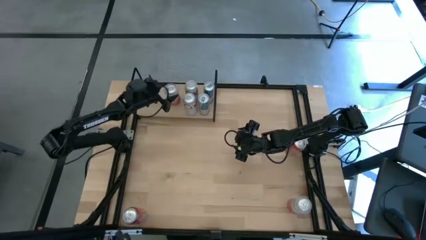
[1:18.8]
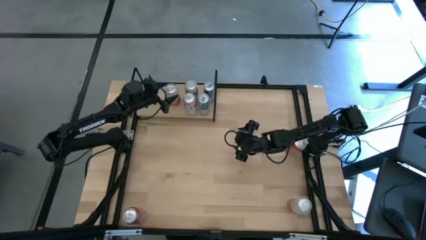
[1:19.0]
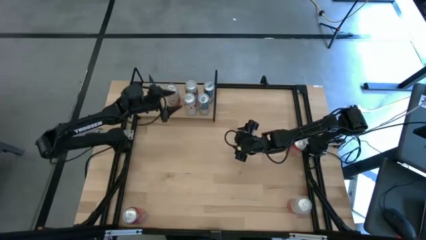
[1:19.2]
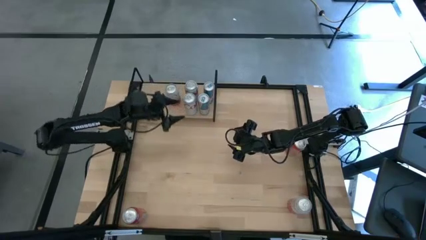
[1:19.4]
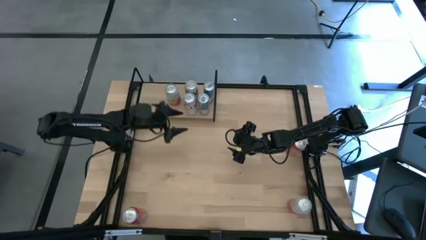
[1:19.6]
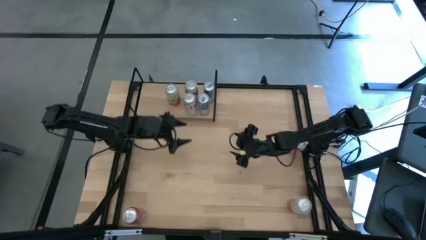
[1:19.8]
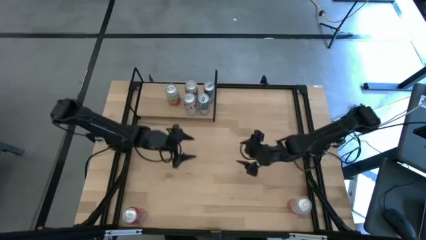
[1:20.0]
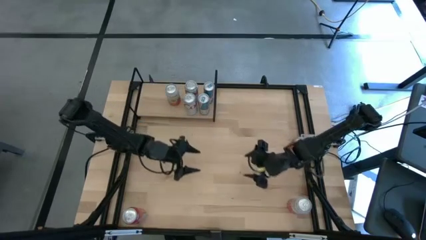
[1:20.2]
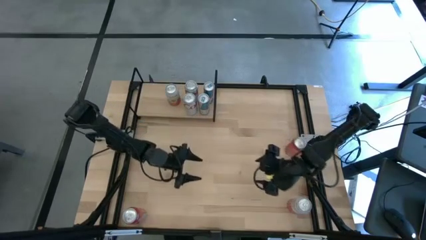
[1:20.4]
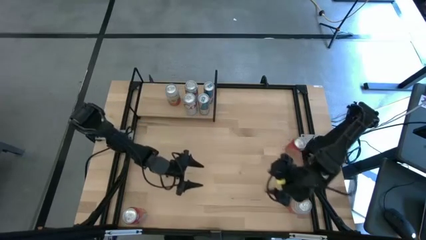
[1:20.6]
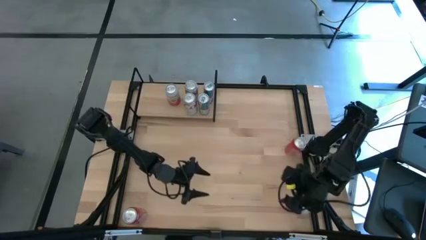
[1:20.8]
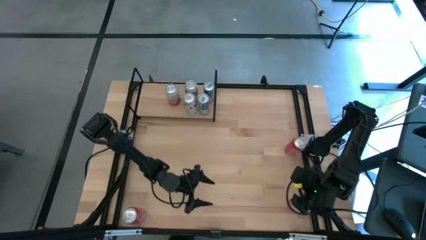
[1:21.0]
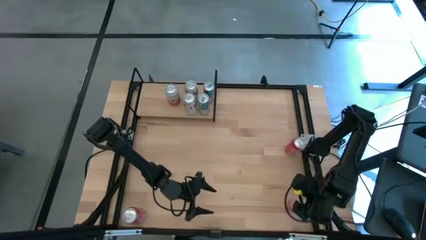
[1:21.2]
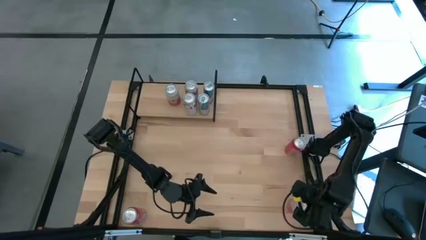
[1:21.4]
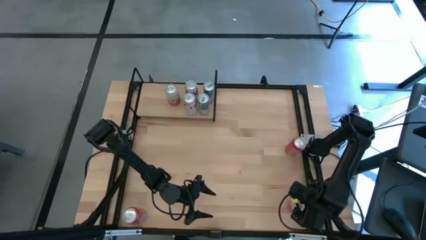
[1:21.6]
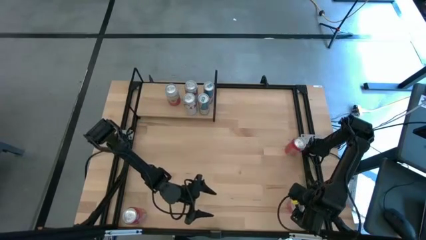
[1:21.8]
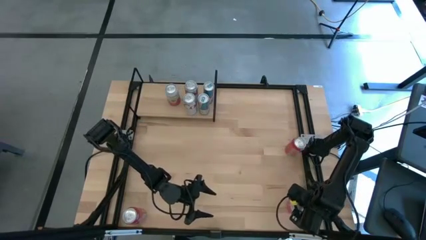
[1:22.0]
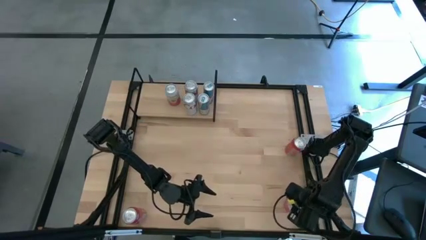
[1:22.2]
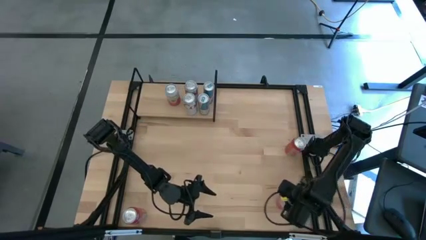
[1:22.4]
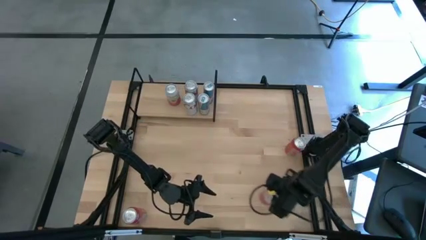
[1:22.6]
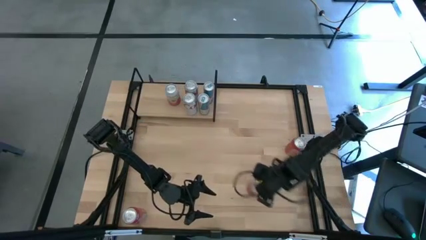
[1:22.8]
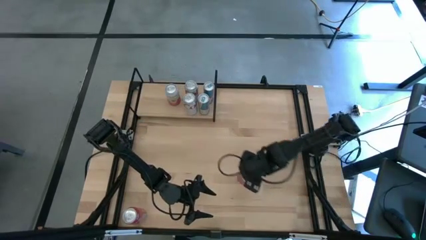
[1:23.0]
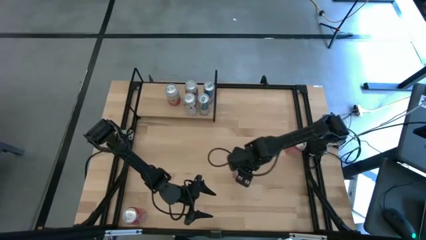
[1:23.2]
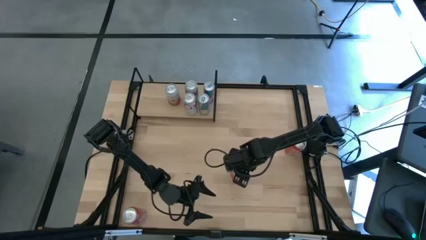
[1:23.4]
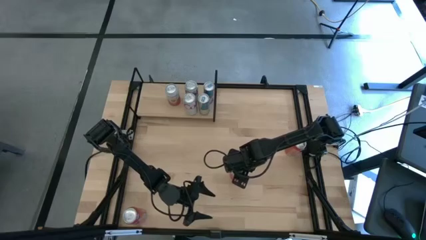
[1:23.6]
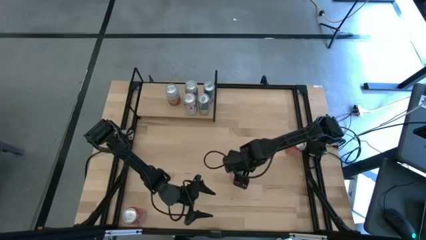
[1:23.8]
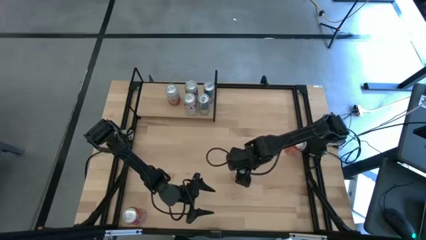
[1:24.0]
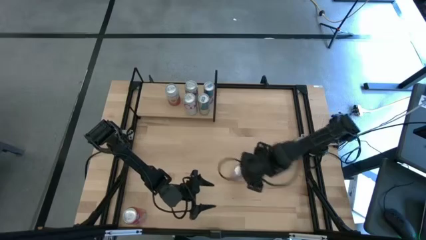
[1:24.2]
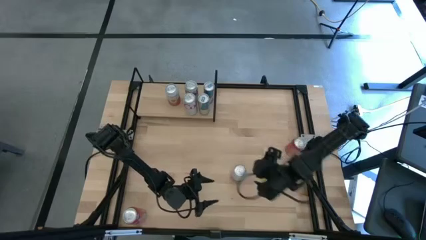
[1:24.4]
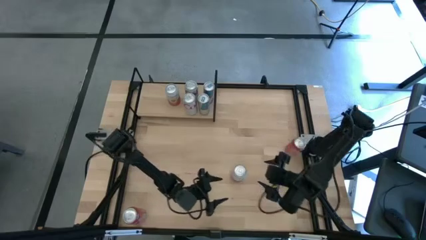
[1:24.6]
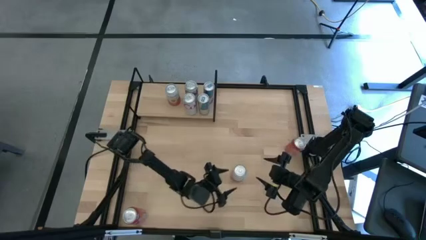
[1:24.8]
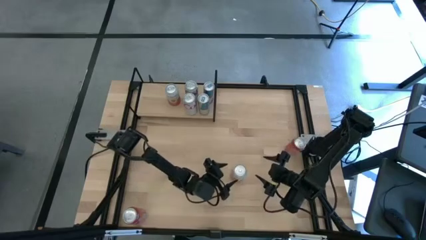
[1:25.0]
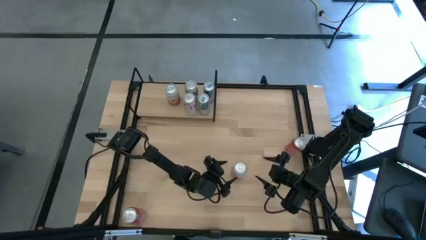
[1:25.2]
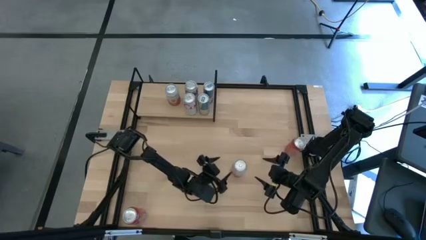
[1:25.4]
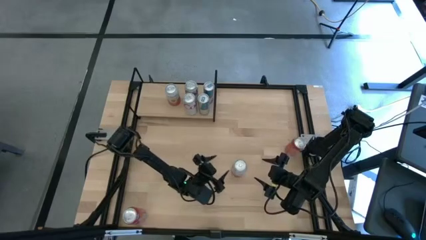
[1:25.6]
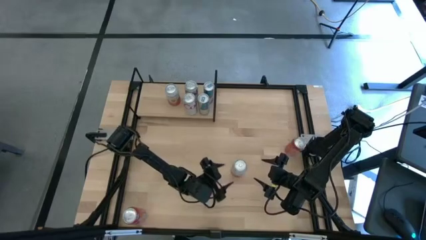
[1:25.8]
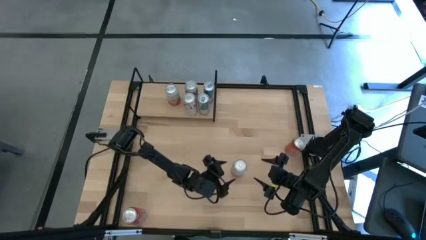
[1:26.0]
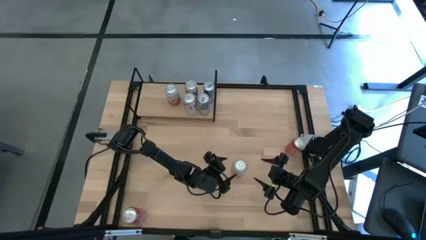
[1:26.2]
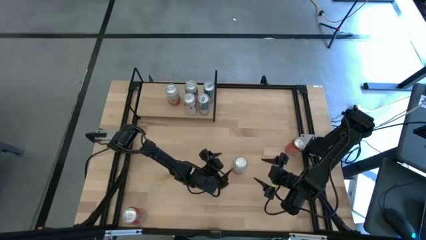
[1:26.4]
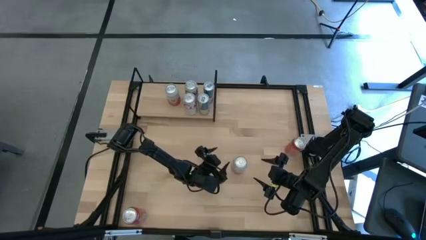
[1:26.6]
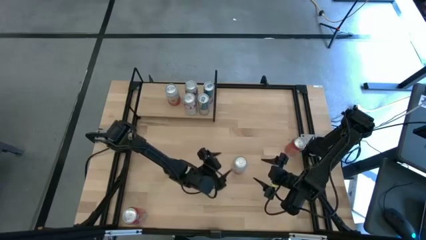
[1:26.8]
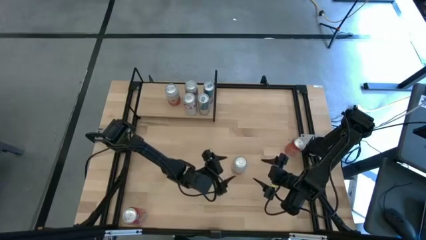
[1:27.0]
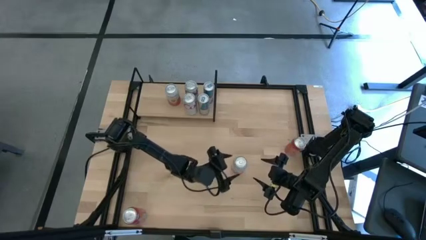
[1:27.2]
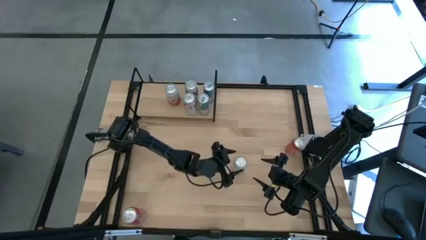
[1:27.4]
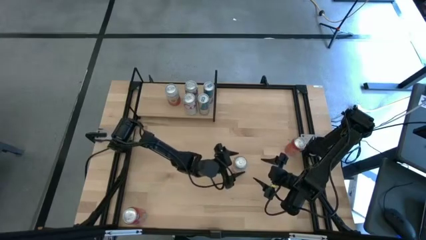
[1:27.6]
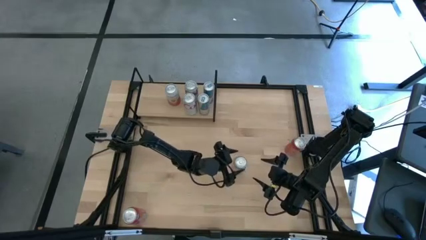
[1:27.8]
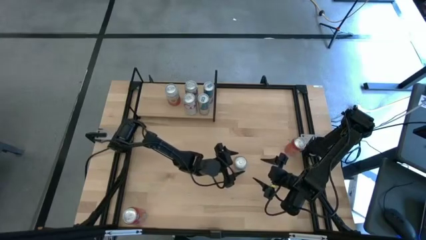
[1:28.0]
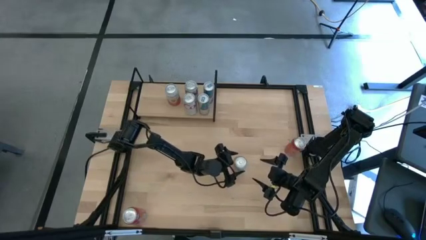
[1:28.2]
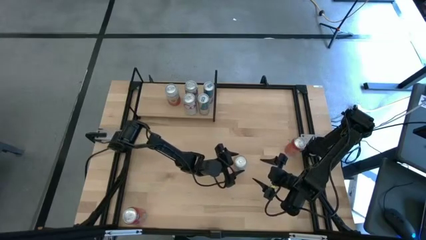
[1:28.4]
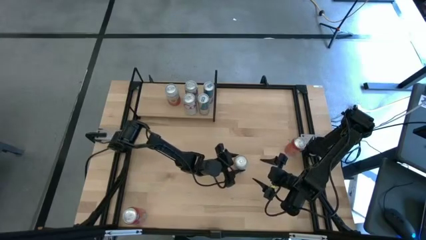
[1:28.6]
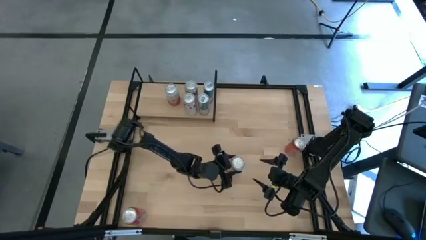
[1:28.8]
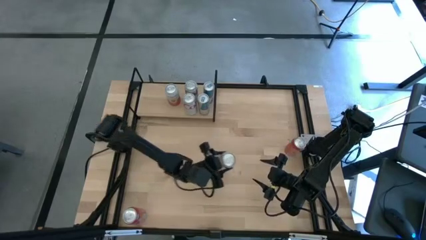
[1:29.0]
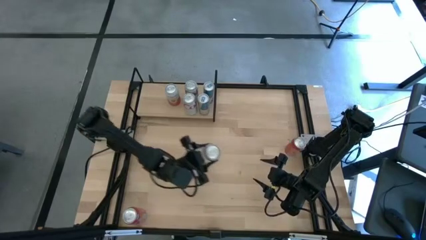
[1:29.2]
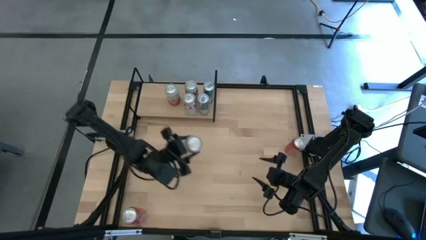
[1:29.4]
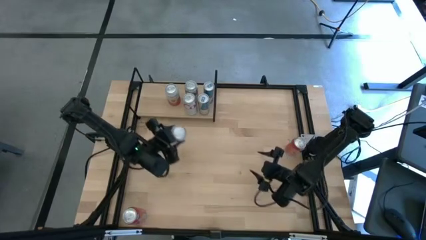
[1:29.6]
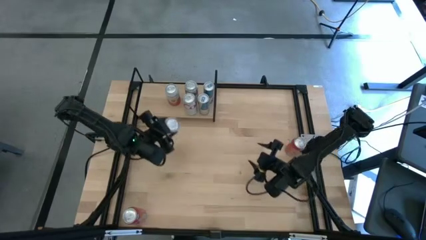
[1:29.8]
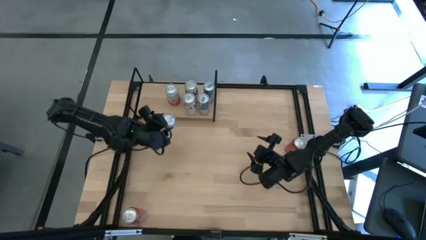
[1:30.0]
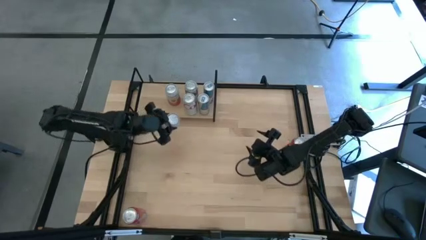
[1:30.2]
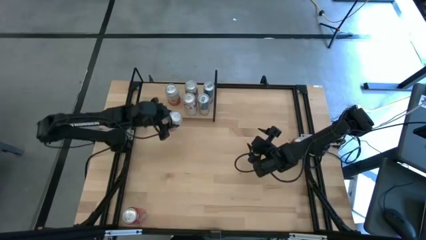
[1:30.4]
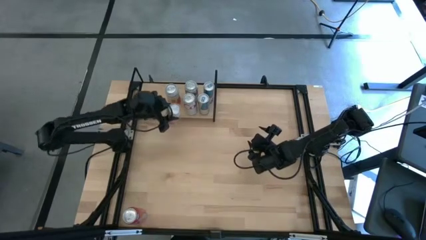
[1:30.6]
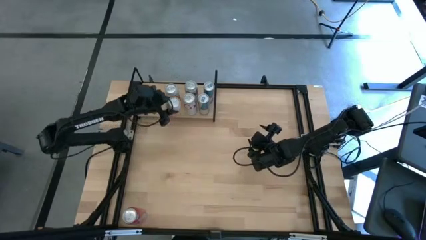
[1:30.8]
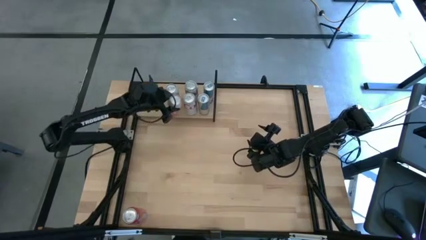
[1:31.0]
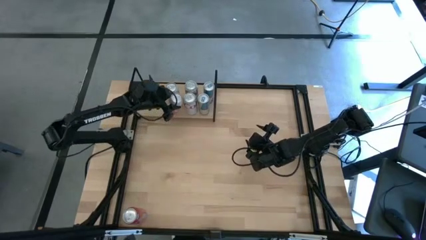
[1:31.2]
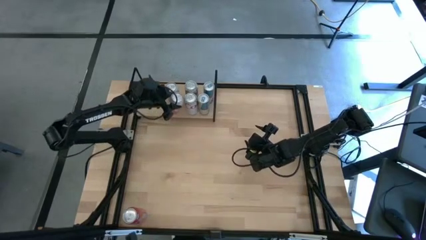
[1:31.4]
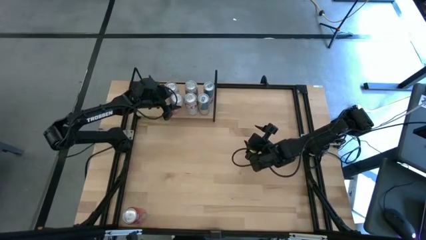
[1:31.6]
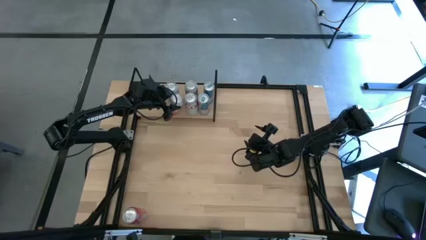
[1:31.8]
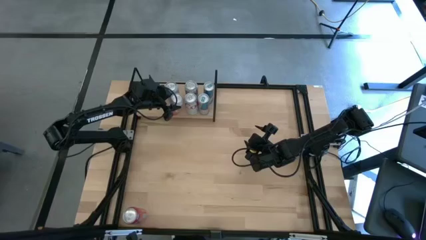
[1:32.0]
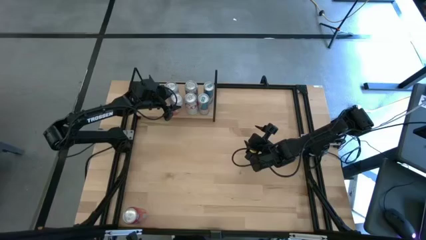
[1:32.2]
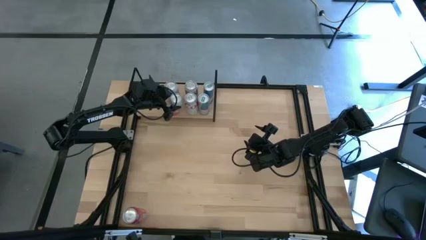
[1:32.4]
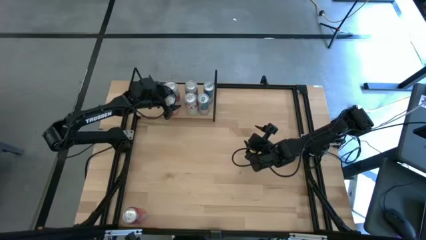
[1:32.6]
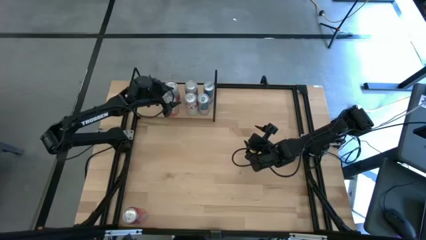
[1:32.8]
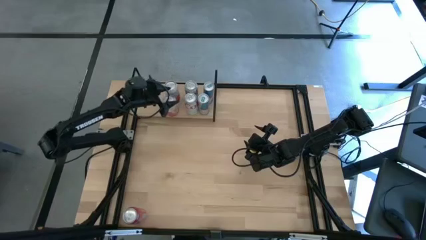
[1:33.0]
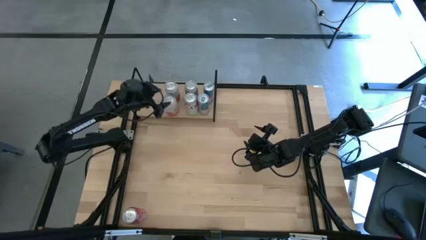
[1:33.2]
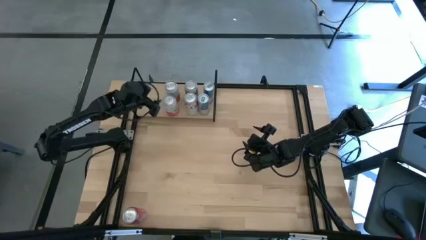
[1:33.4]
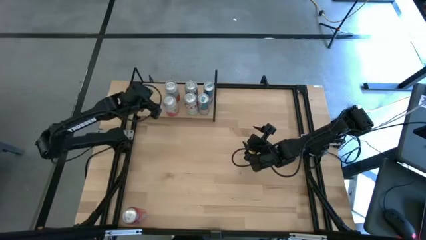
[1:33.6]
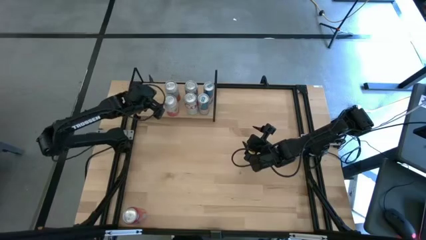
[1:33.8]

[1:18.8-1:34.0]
Task: Place canned beverage on shelf
Put the pink soda can on the shelf aligned with other pink soda can
